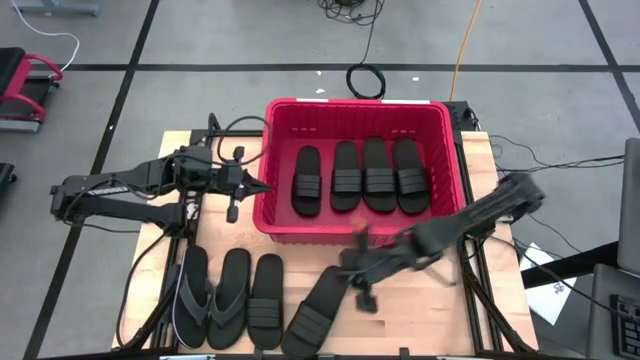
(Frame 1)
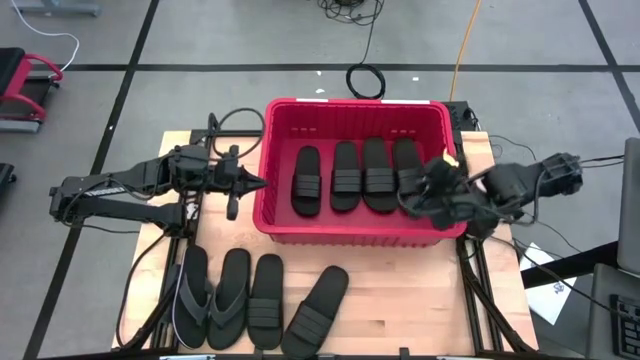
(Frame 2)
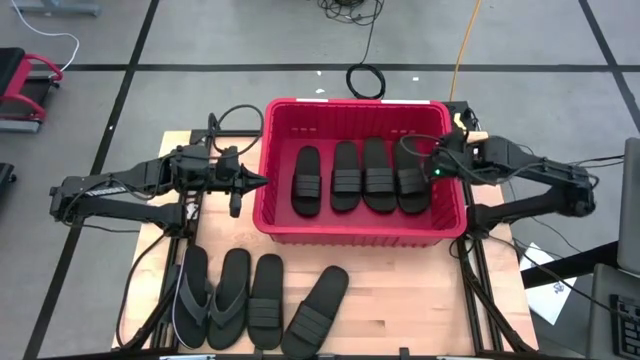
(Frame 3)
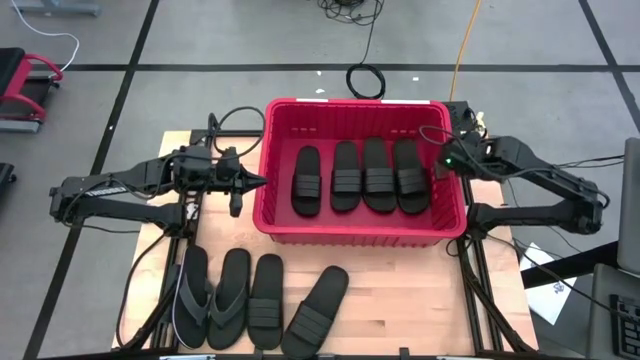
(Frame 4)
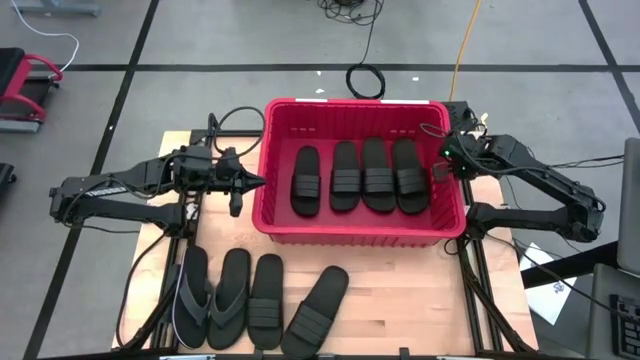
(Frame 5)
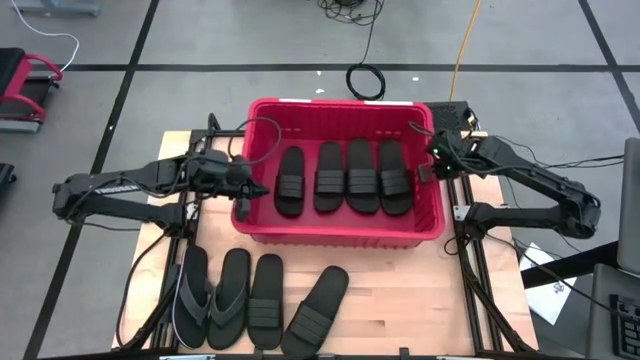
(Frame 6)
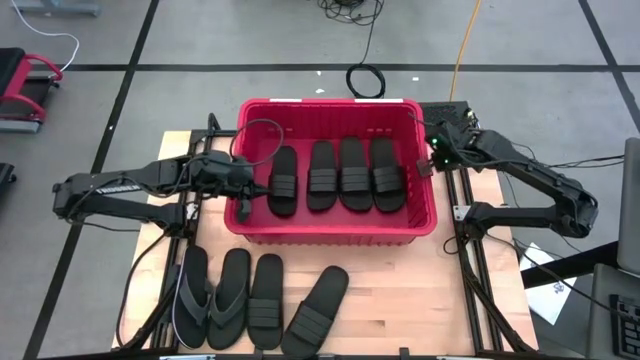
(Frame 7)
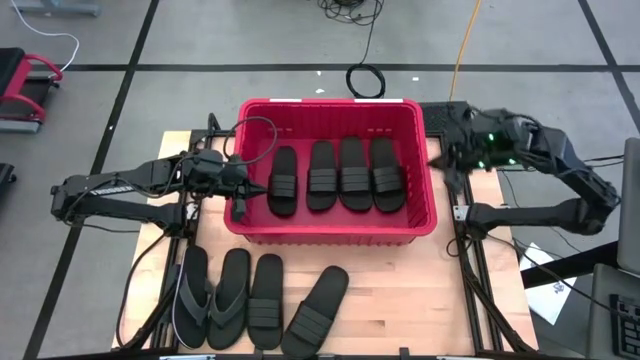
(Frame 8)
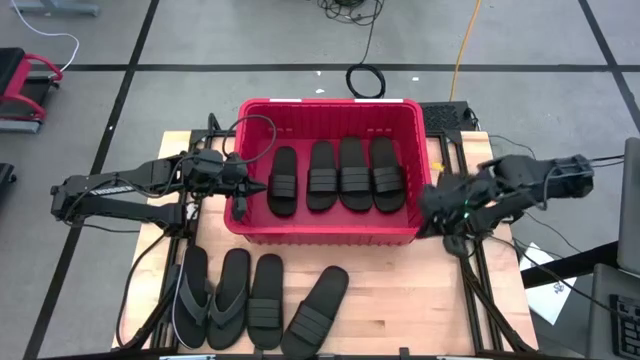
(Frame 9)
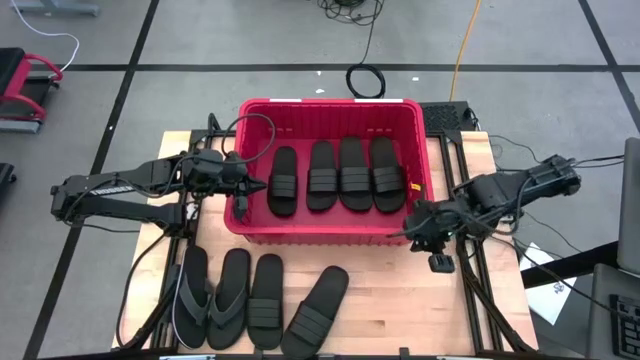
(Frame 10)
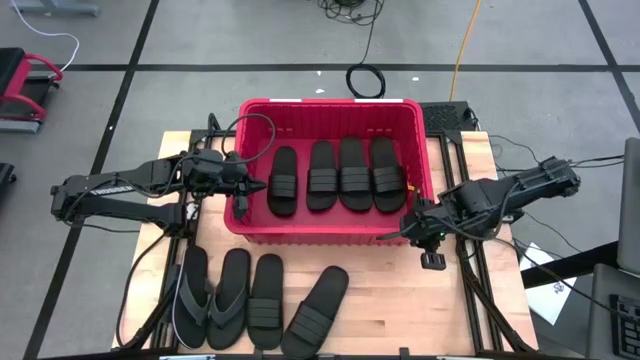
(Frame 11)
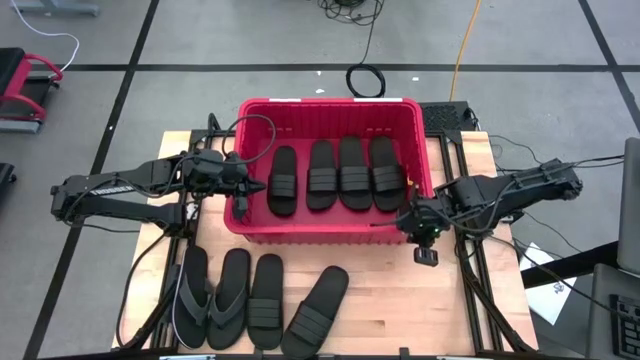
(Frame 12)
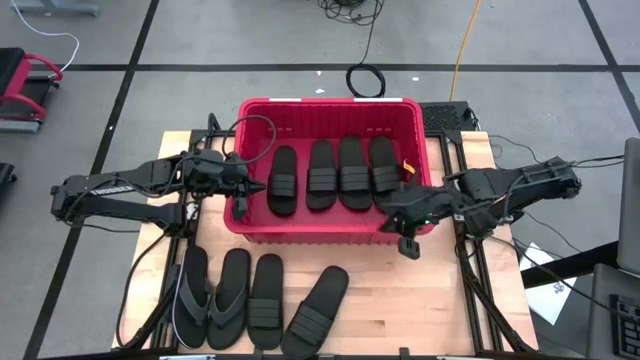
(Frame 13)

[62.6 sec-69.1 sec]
Task: Pick and place slides into bin
Adjust the red bin

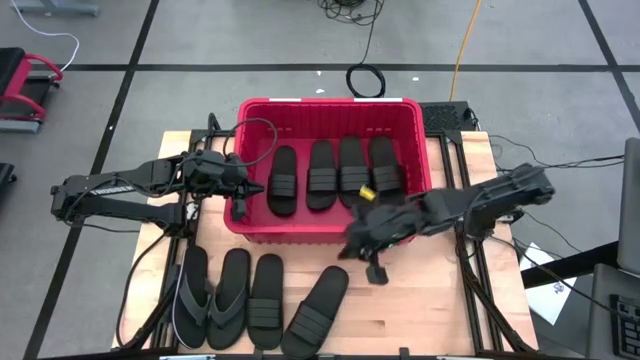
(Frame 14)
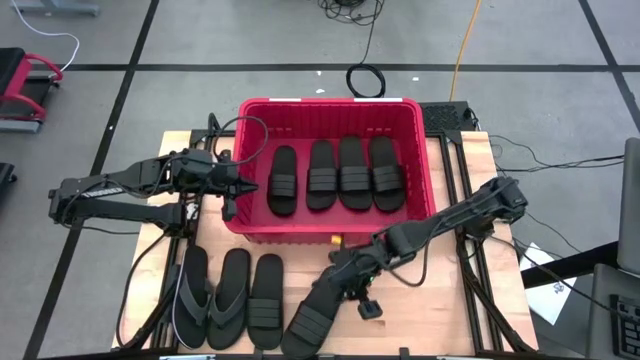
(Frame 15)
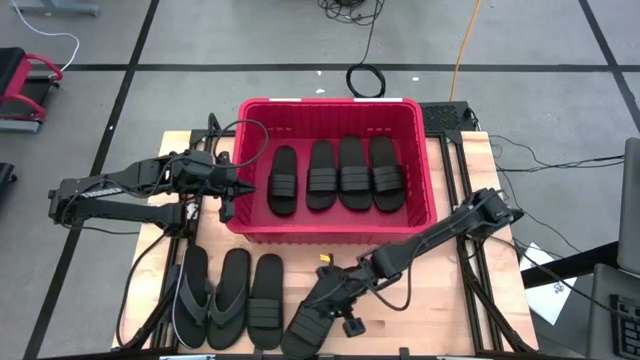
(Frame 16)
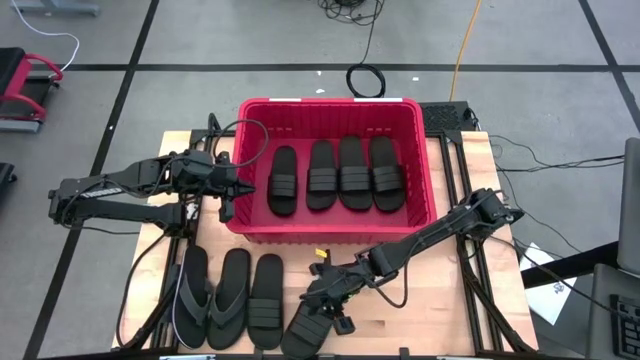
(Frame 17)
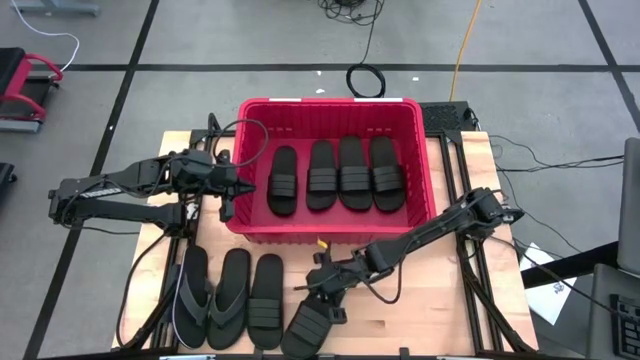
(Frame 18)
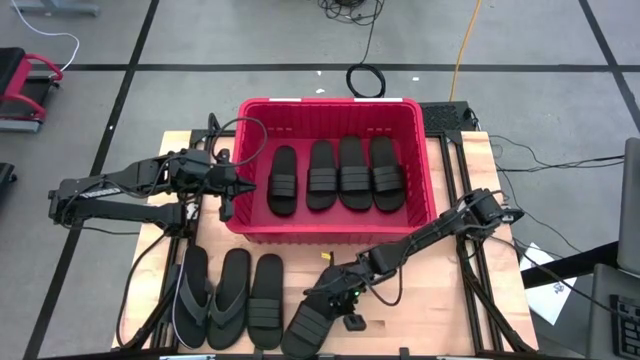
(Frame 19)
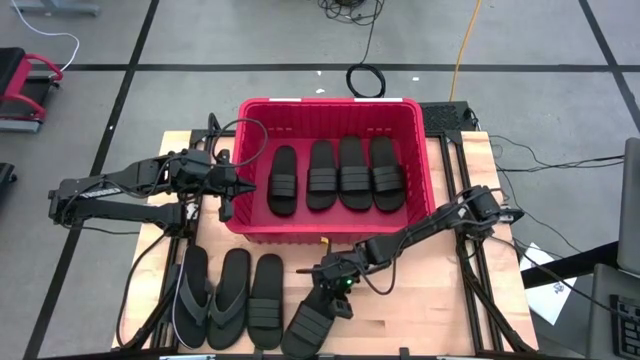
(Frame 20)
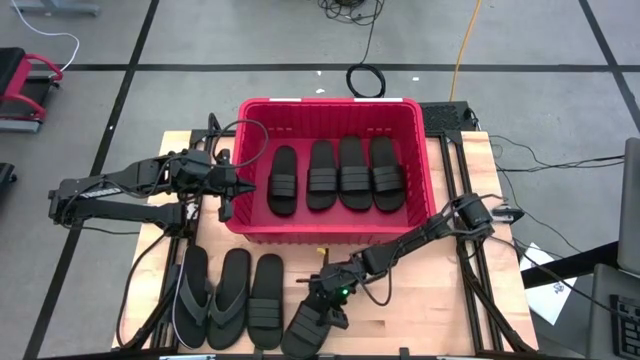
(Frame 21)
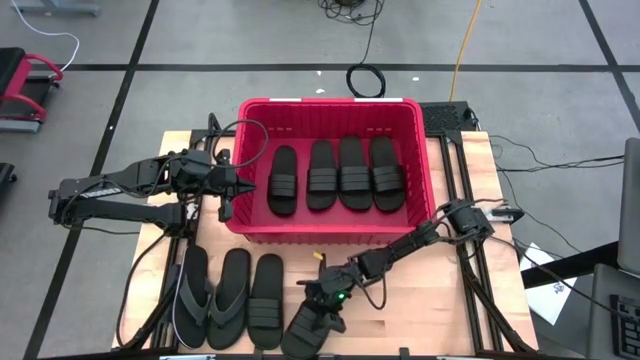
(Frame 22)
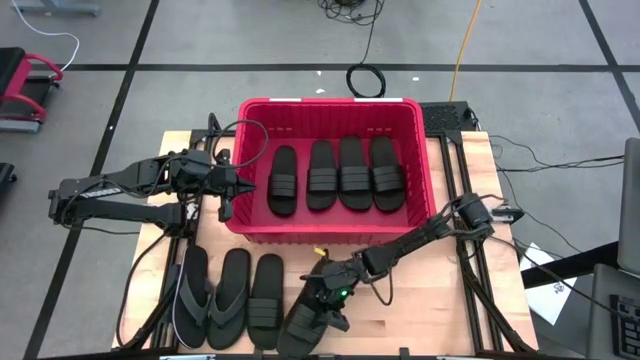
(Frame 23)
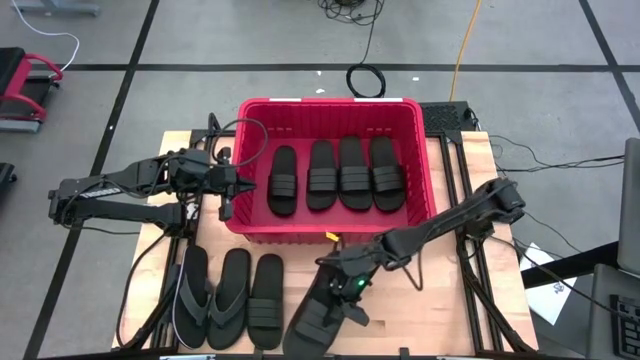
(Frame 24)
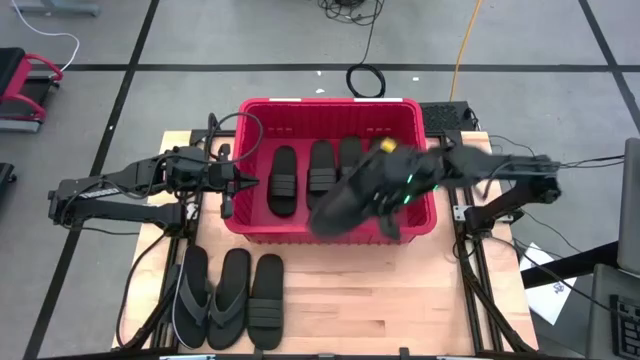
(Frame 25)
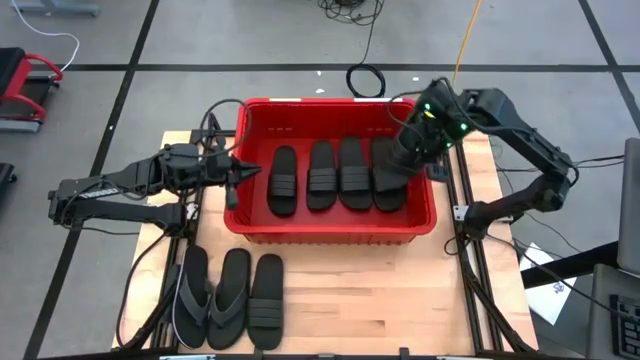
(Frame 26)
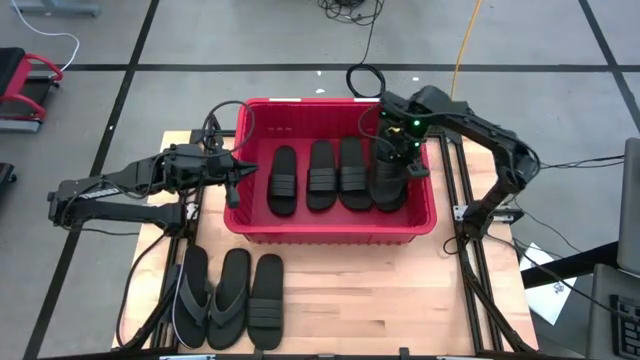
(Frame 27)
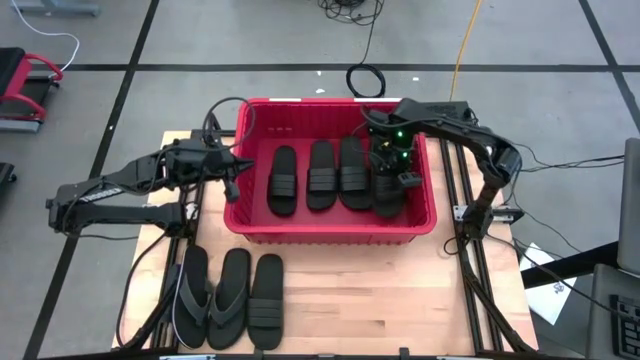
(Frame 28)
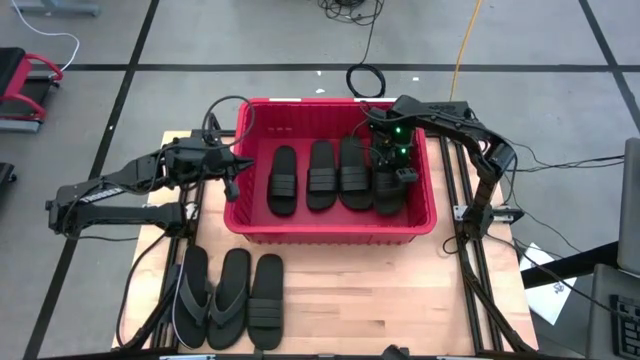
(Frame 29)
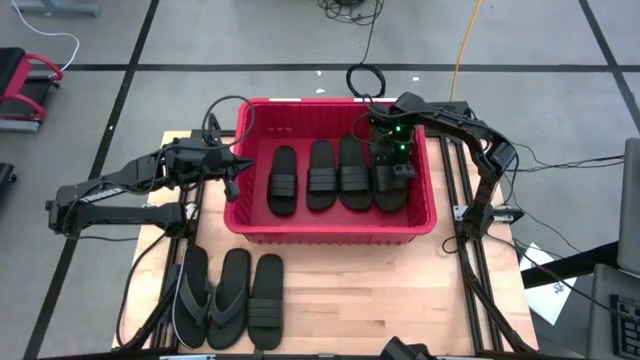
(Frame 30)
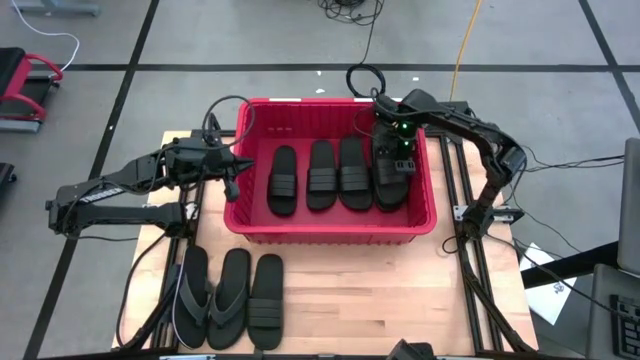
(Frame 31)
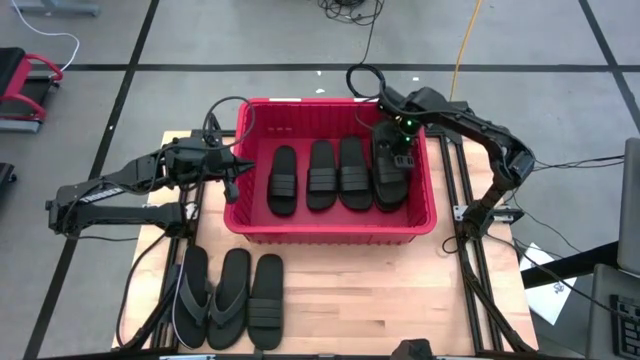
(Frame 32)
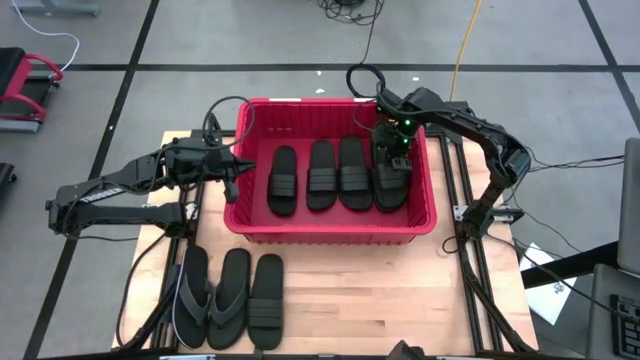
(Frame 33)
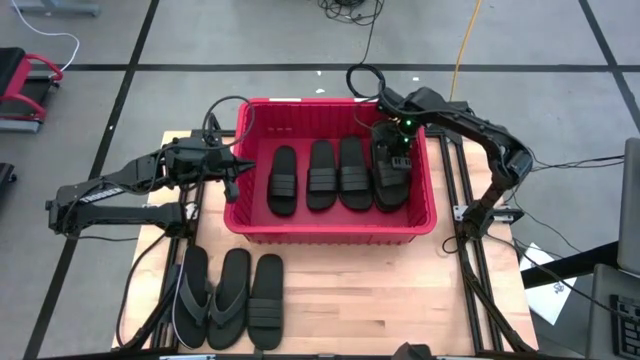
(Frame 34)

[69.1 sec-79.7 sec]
Put the black slipper into the red bin

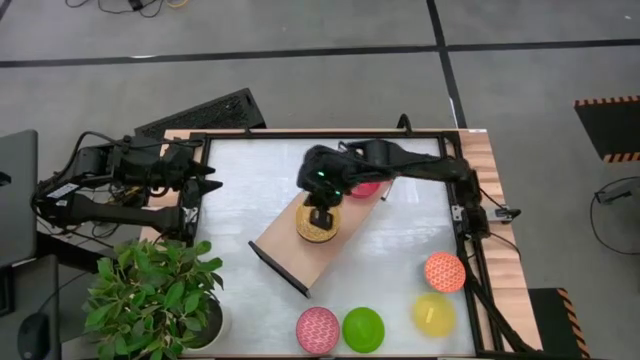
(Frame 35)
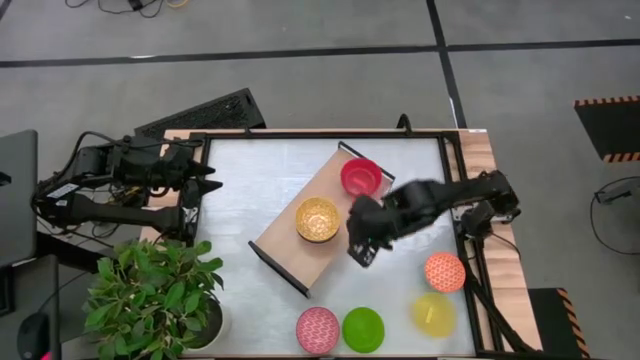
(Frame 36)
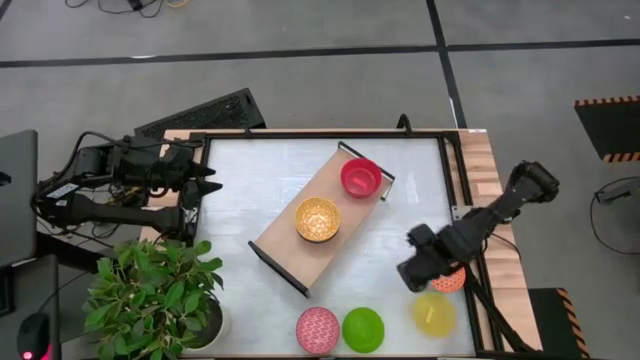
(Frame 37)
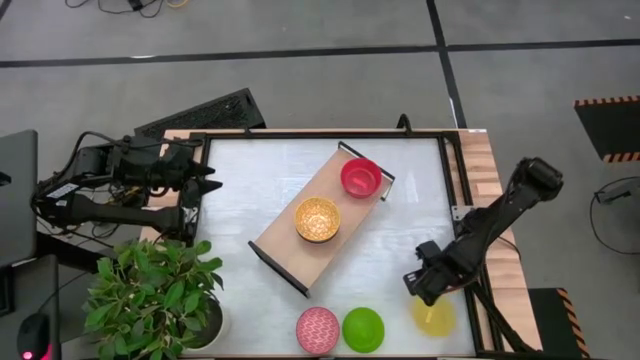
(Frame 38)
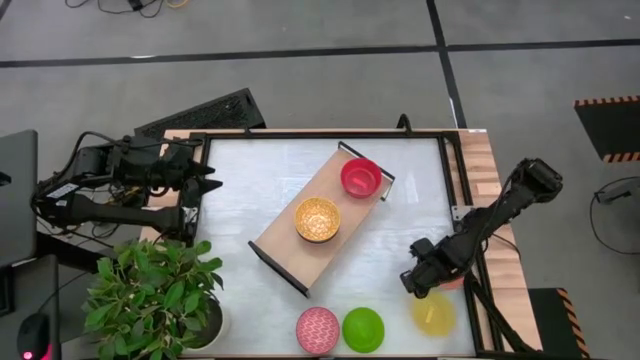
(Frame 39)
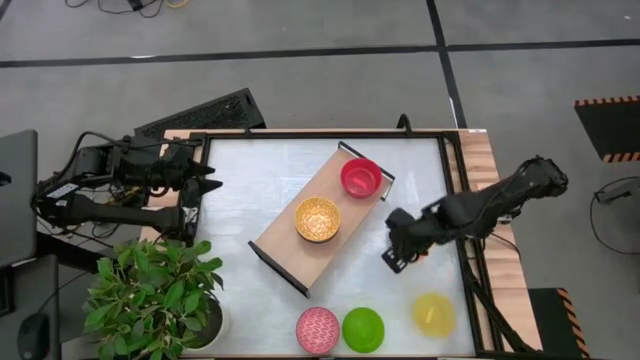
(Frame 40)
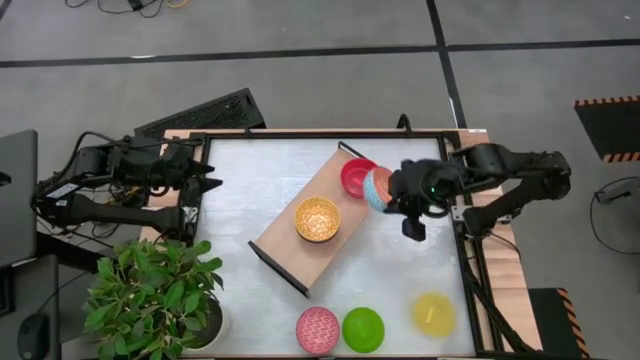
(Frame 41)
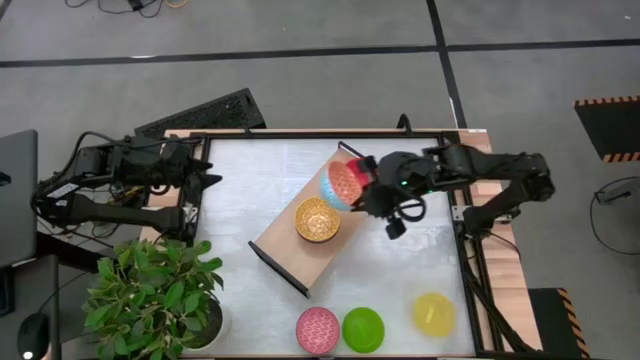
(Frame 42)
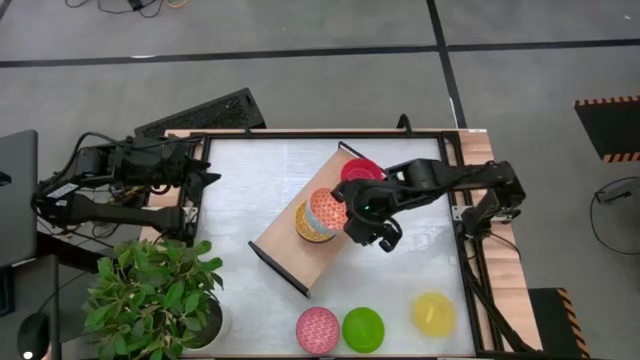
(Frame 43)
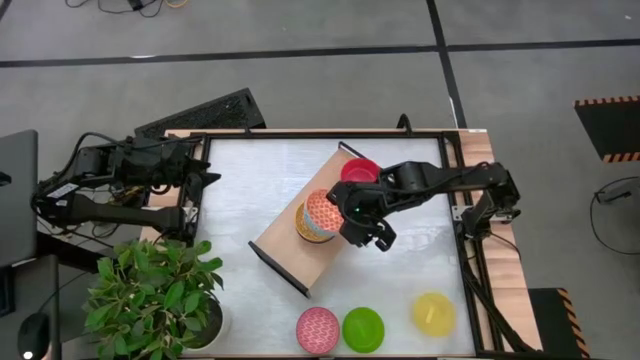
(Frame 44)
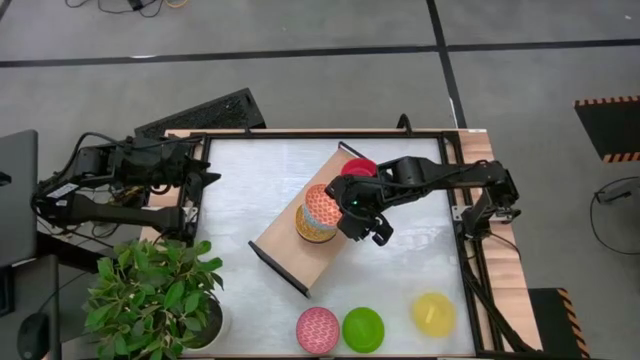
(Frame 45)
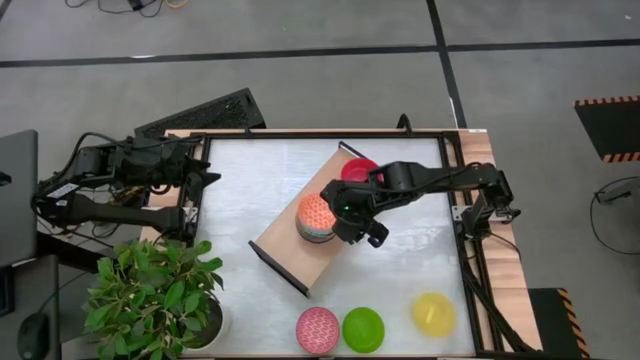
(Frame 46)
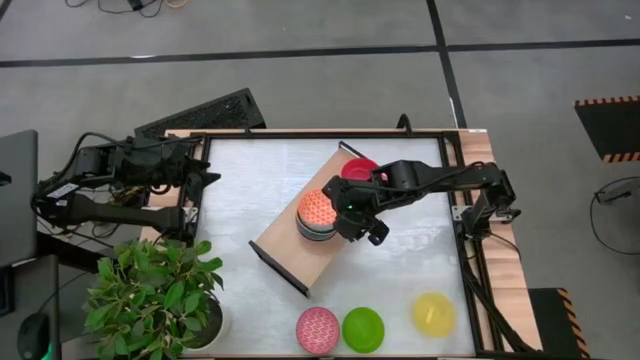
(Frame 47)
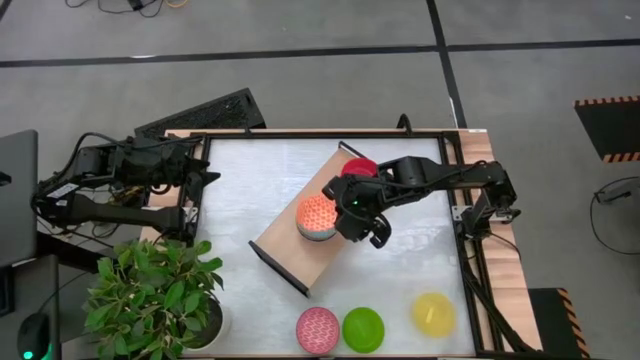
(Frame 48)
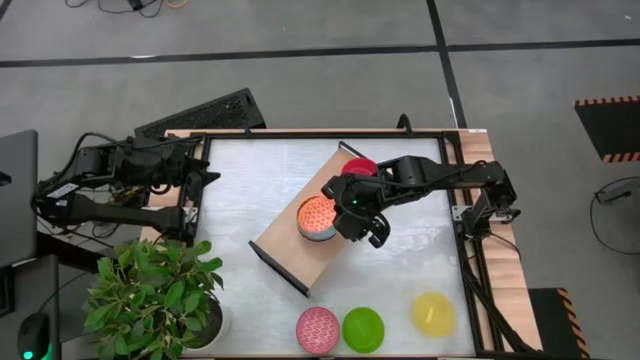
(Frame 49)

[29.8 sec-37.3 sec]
Task: Place and stack bowls onto a shelf
Stack the orange patterned bowl on top of the yellow patterned bowl on the shelf
